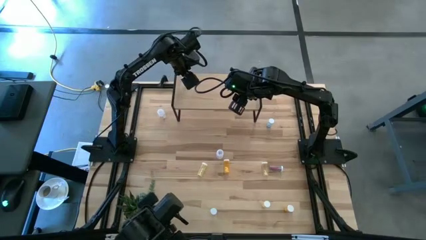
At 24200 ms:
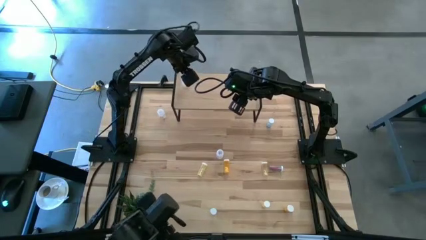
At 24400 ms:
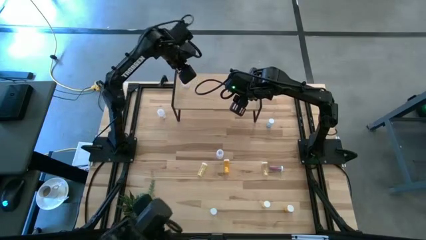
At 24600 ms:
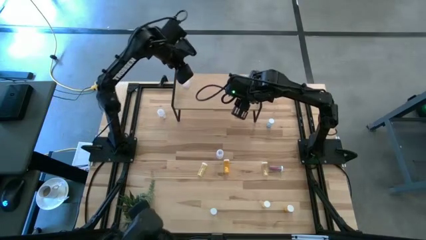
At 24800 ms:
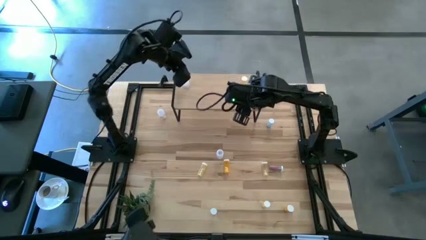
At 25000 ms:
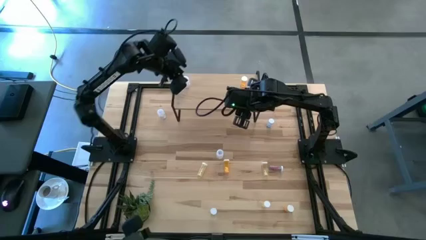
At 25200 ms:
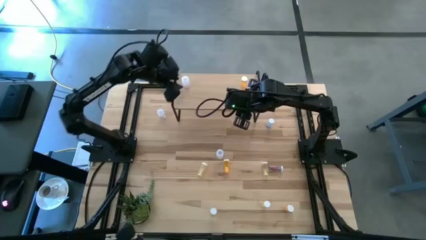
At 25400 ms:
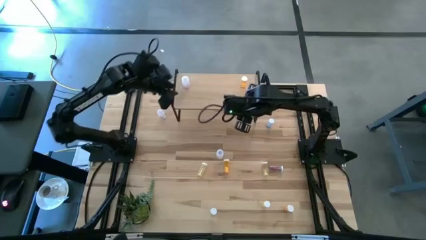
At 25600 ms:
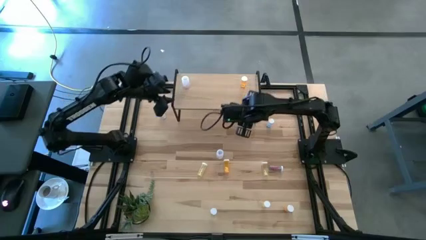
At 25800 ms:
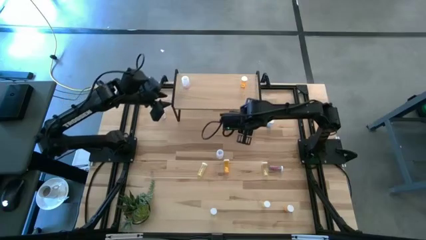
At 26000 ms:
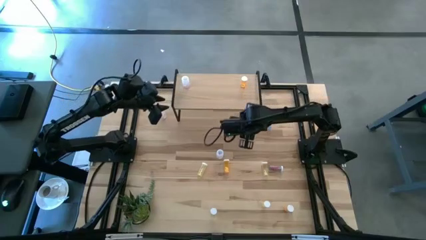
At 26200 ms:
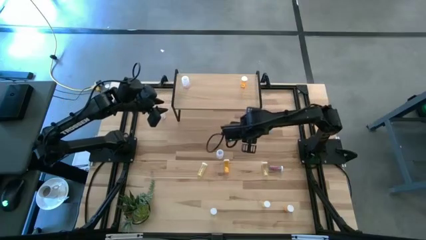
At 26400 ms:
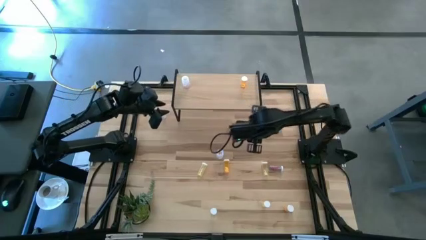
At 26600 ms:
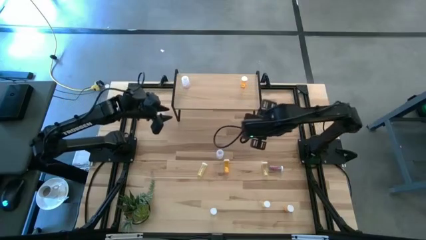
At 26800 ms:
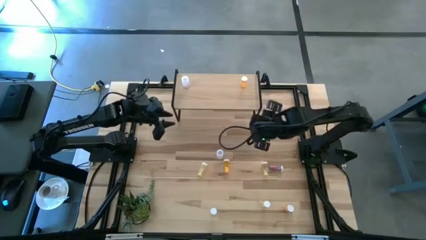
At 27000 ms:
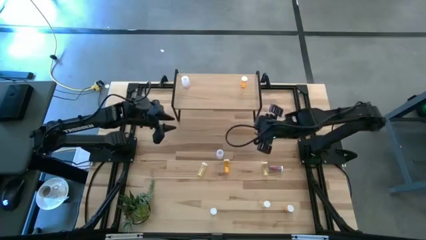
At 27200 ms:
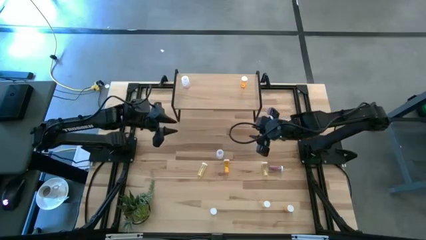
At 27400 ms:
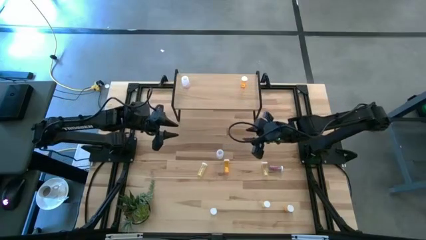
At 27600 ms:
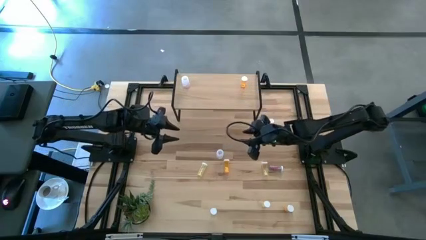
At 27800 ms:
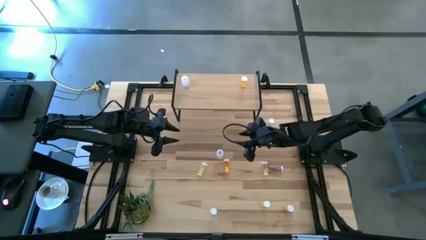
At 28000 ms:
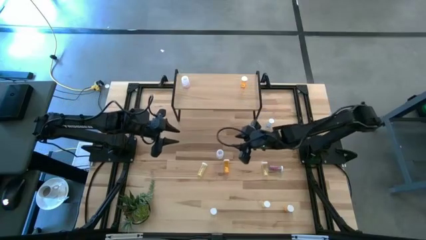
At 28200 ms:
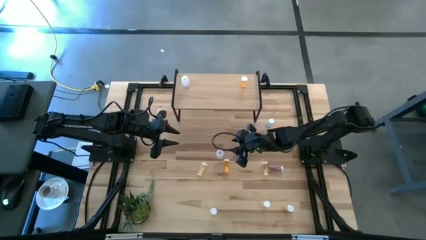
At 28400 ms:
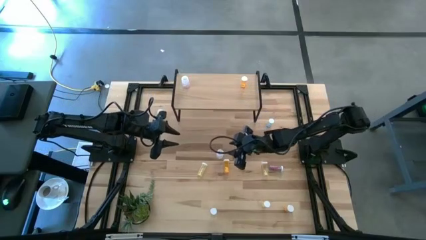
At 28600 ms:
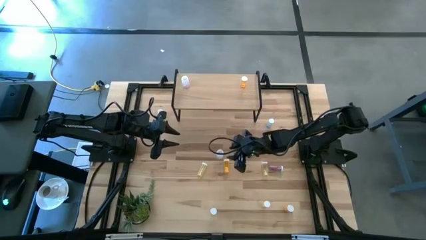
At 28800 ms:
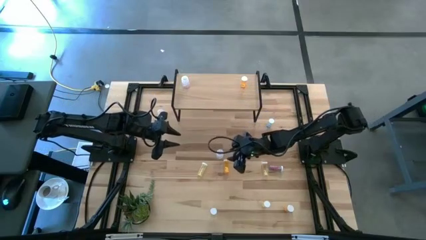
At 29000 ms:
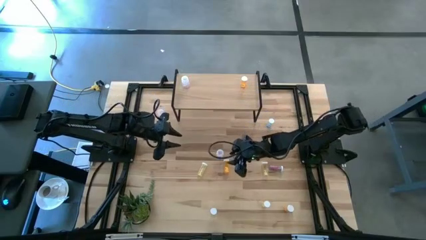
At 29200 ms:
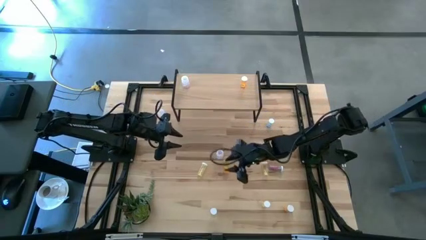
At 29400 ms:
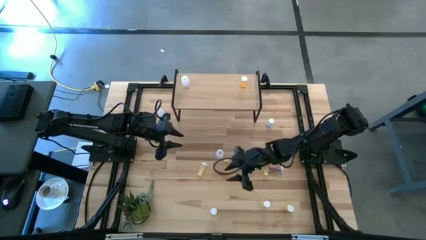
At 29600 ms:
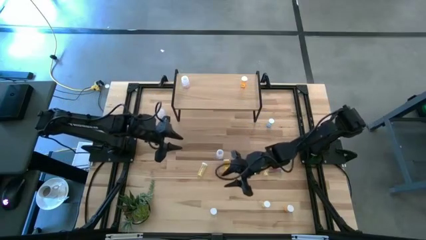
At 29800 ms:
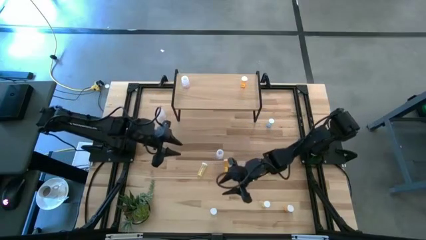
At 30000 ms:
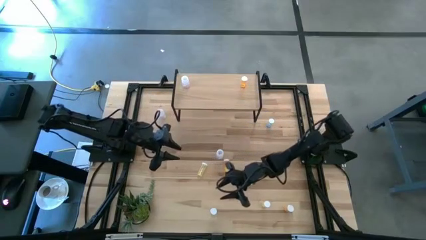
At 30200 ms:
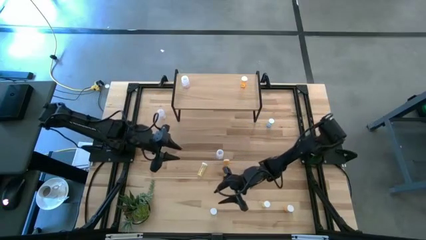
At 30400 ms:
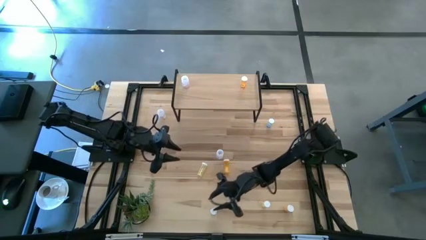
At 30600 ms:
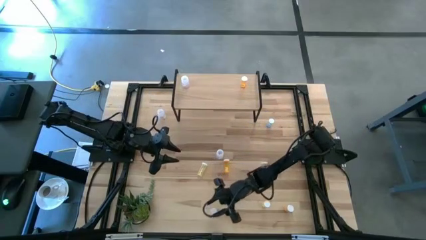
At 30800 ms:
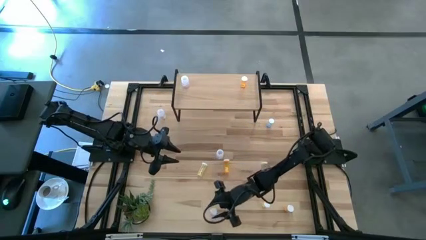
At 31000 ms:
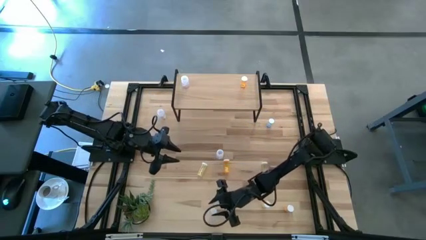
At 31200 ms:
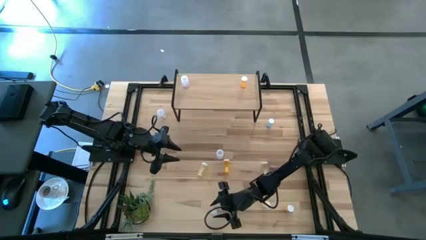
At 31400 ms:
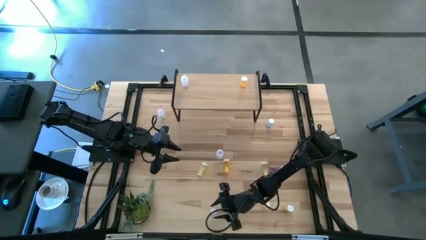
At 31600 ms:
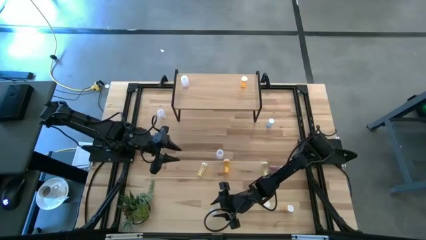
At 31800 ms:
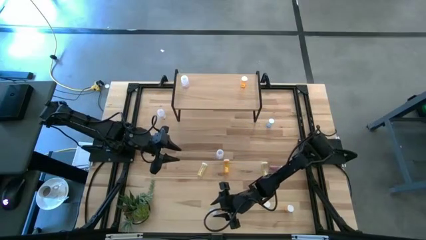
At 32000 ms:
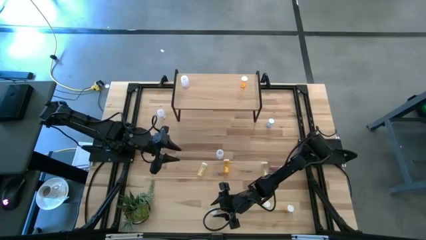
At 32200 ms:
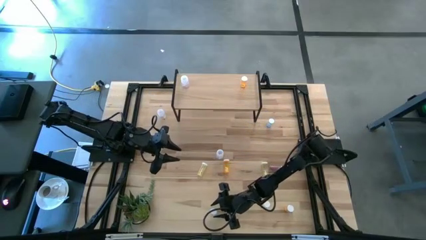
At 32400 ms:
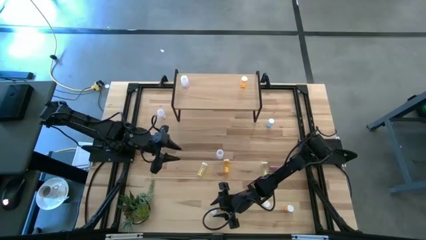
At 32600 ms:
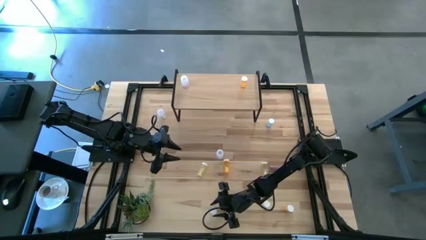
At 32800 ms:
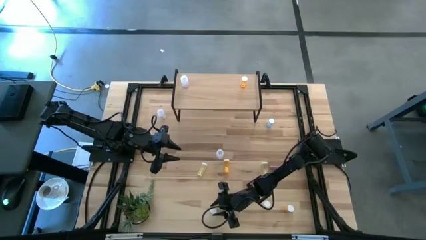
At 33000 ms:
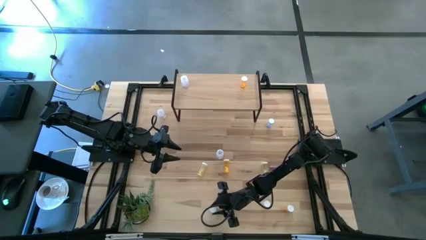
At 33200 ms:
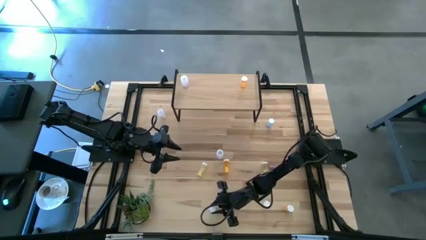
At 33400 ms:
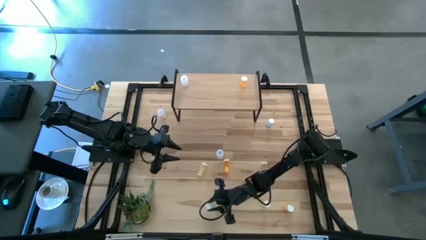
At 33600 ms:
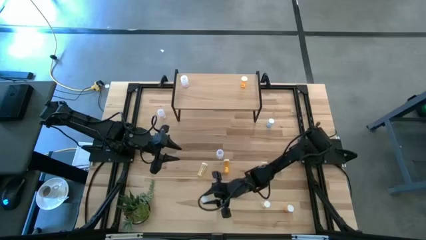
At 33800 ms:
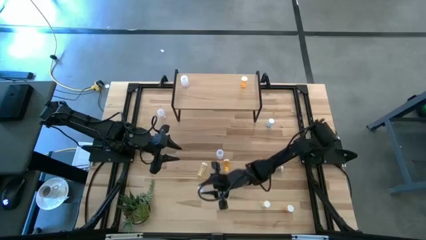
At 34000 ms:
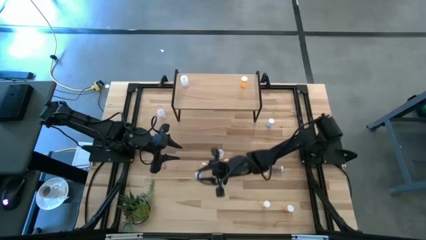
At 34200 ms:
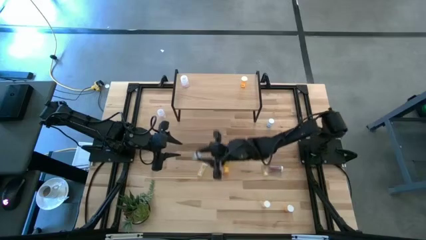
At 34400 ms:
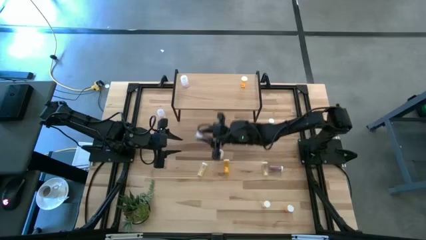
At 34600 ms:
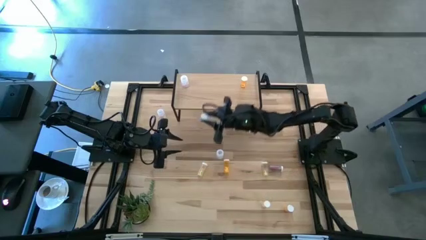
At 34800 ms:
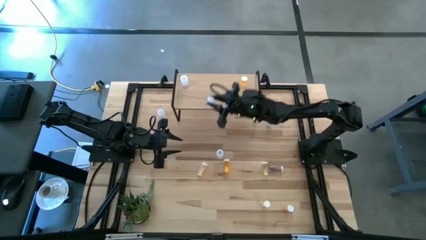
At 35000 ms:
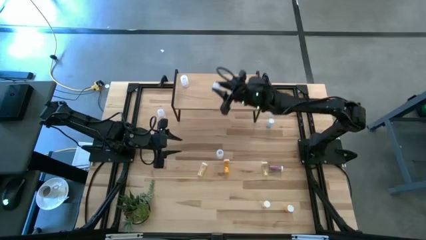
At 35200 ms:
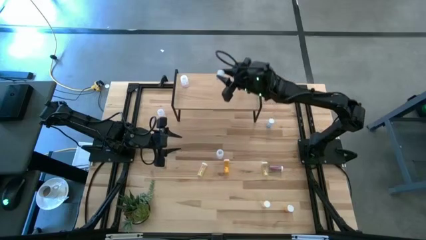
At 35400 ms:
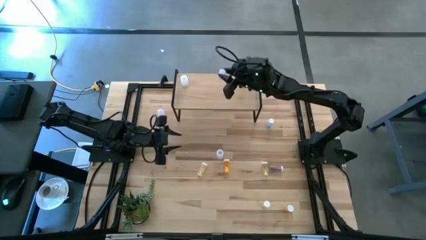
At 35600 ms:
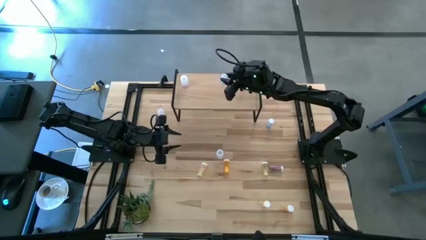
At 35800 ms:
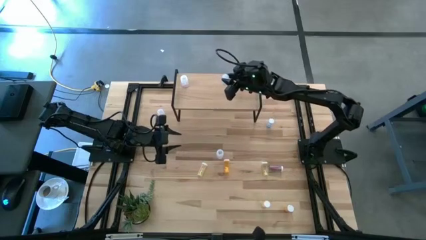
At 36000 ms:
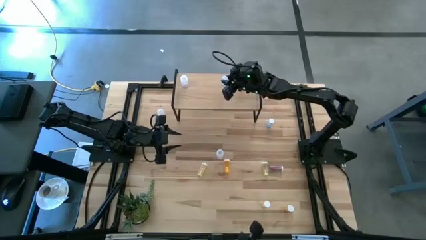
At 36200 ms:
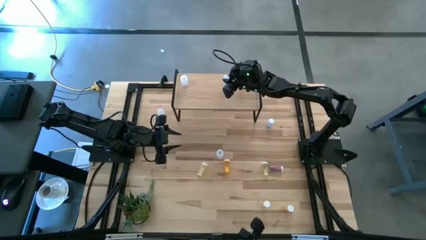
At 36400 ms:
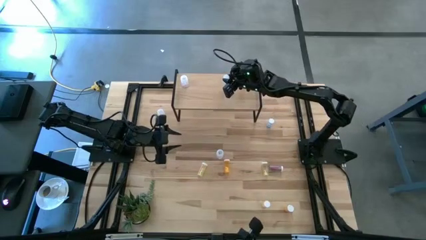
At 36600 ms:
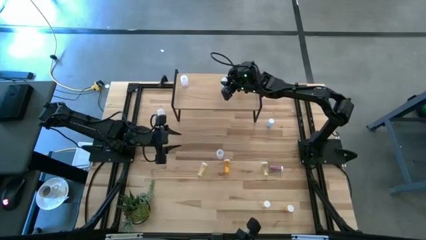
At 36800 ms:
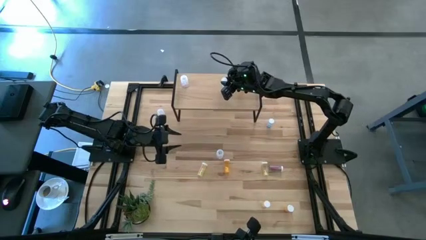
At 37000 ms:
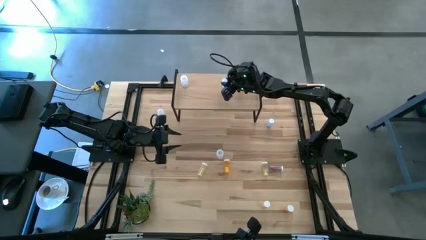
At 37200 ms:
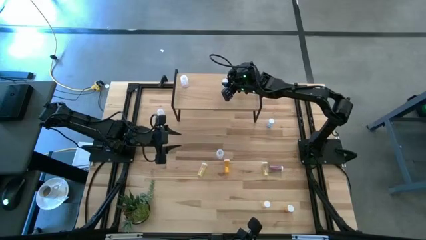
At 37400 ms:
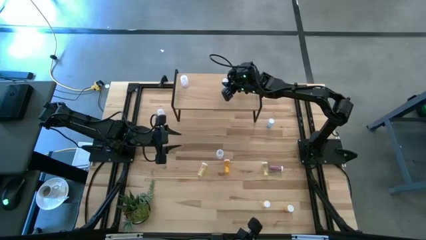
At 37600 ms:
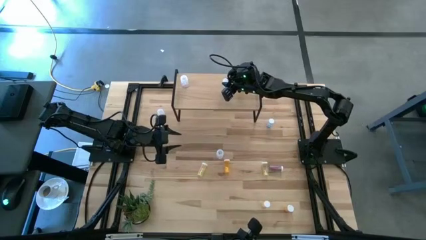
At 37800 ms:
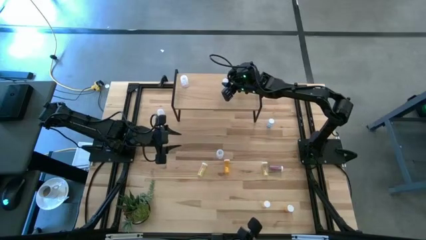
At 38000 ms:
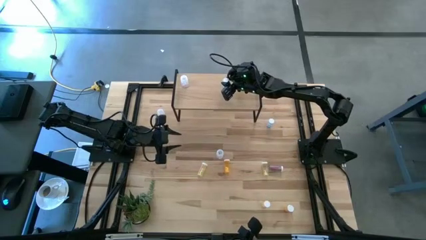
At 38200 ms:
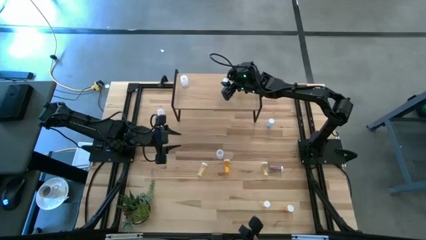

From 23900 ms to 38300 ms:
Task: Pick and place medicine bottles onto shelf by color
Put the bottom left blue pill bottle on the shelf
